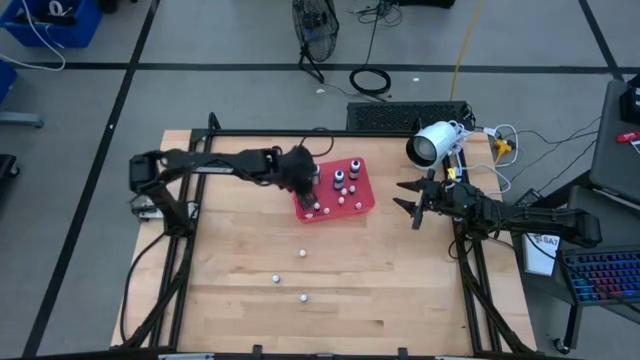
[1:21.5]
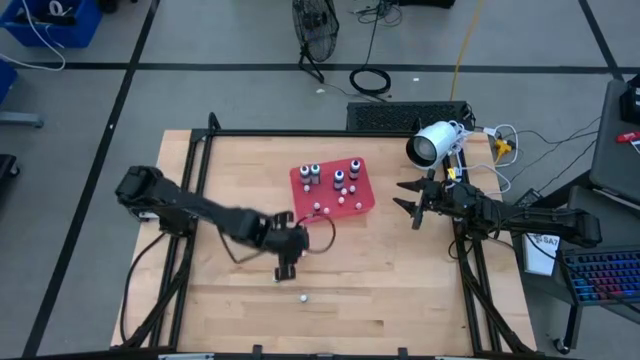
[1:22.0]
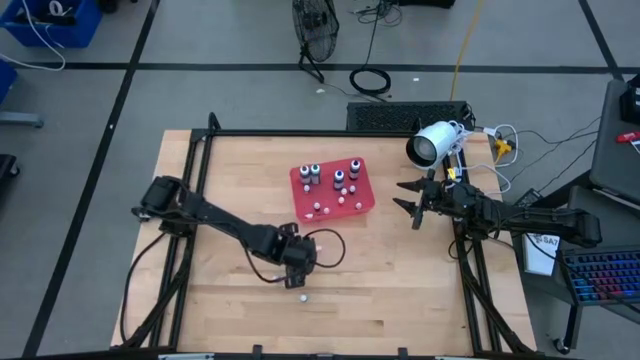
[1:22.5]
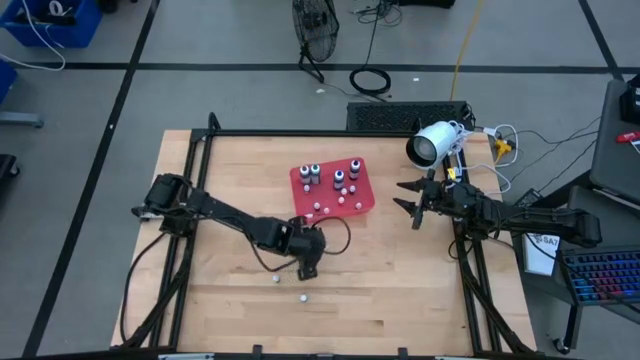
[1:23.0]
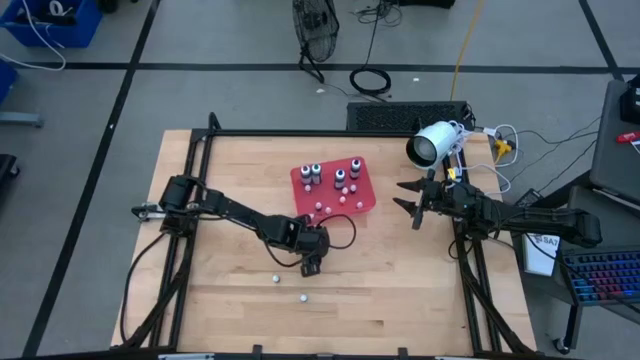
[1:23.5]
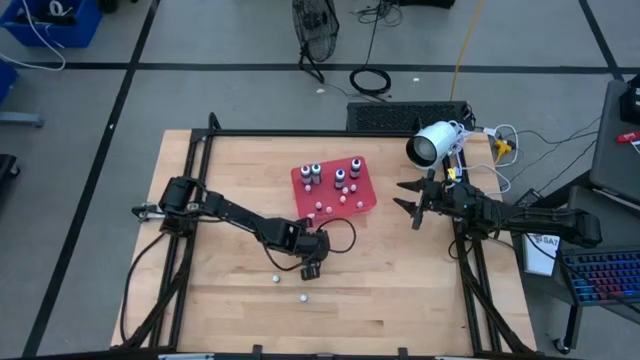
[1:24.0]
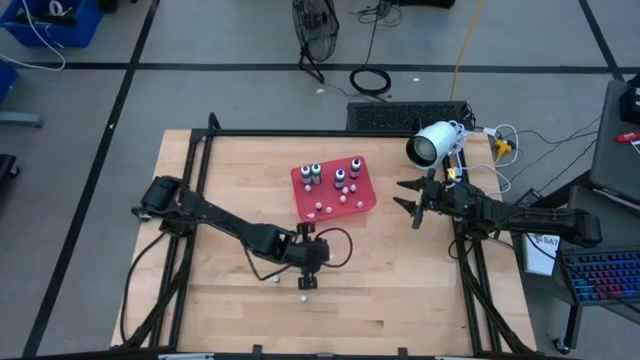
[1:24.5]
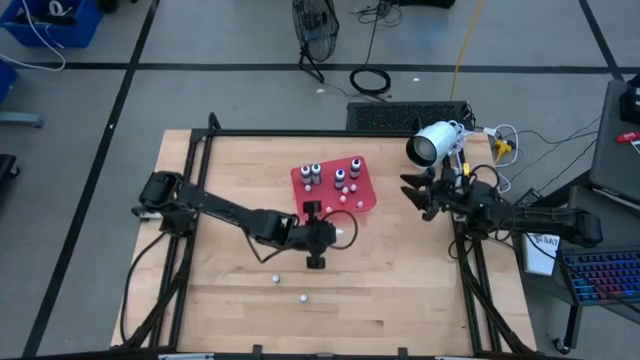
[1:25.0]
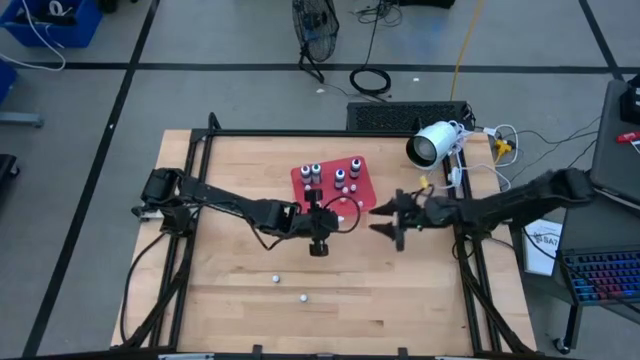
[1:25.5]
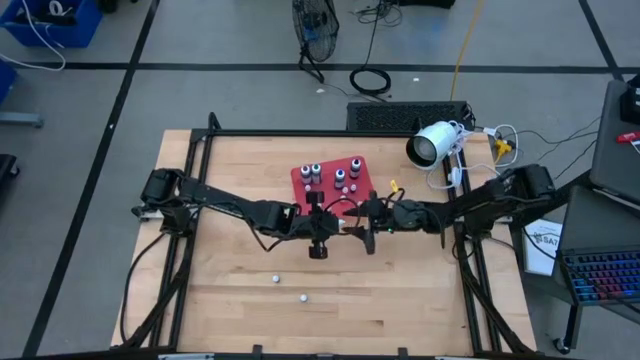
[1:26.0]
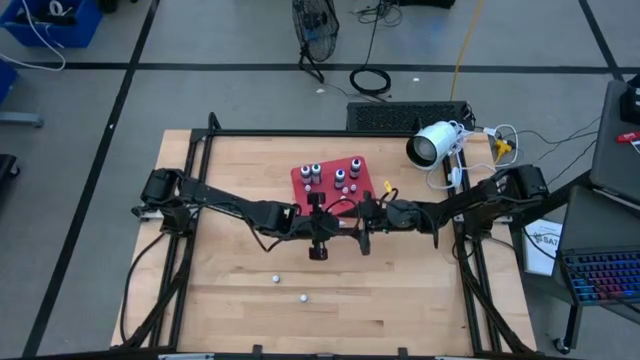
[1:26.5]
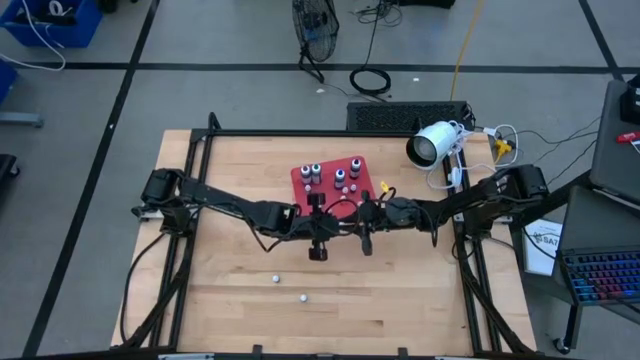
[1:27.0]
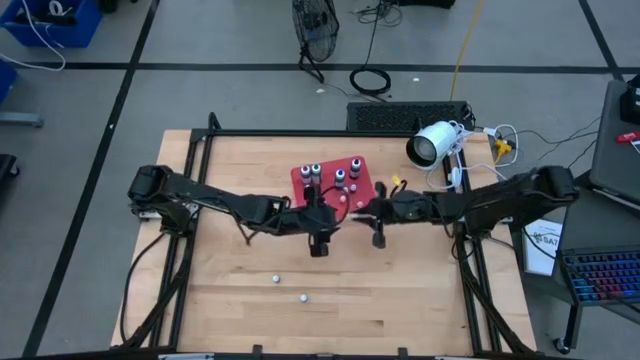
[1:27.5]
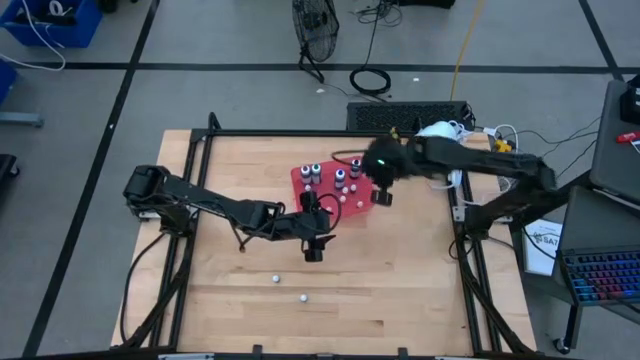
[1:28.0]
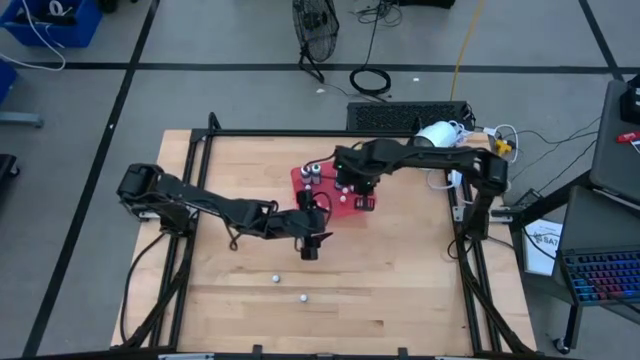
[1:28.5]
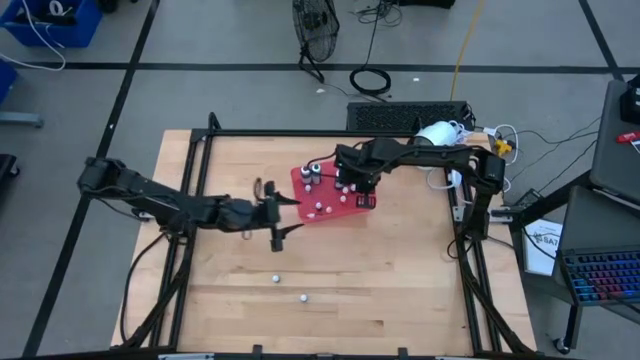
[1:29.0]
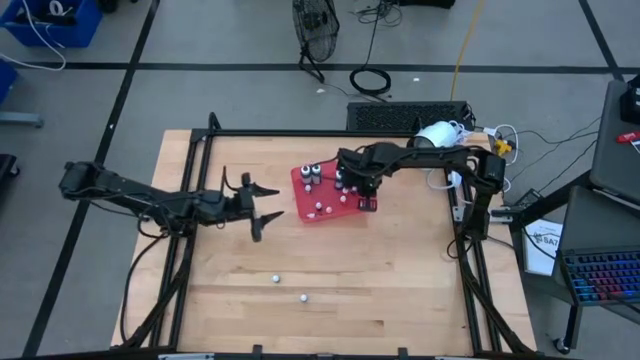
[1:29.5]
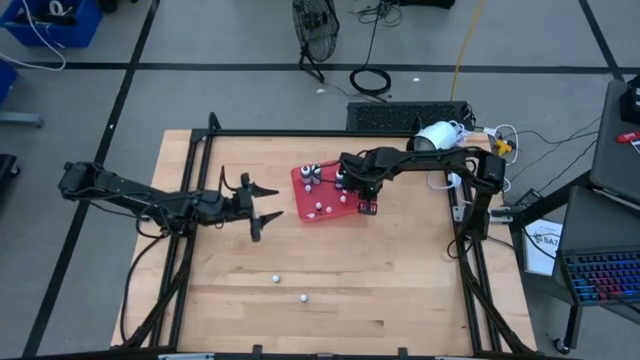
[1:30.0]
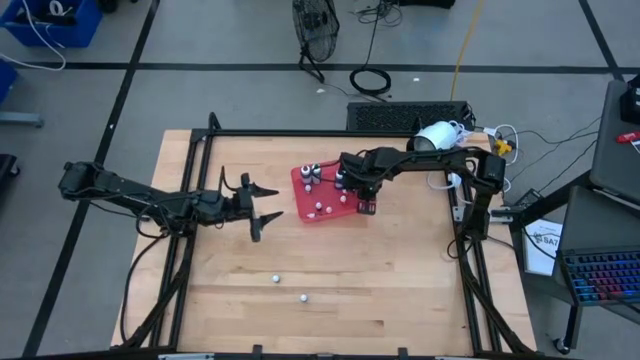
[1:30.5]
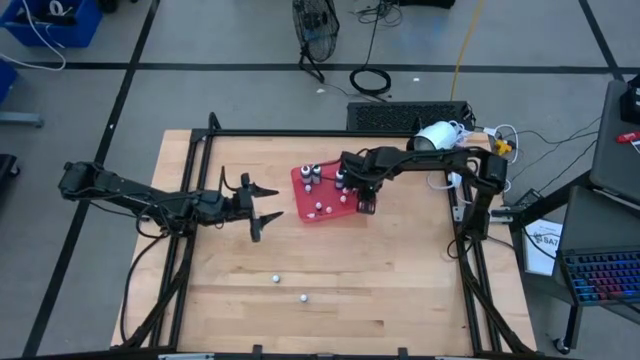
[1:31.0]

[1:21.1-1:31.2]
Task: Pick & Place food coloring
Put the orange food coloring bottle into the bin

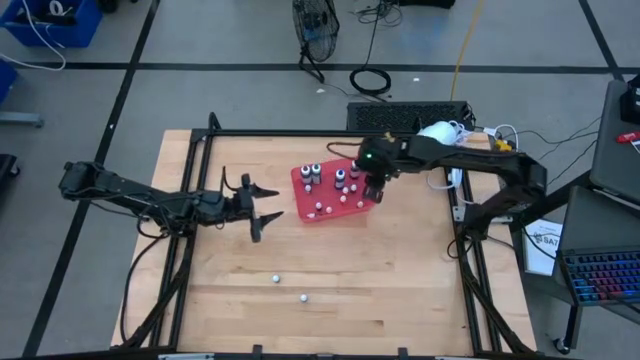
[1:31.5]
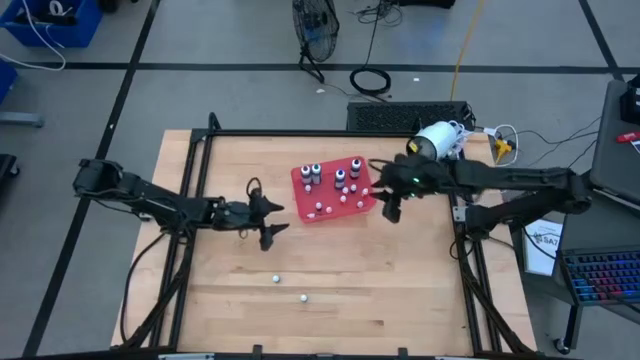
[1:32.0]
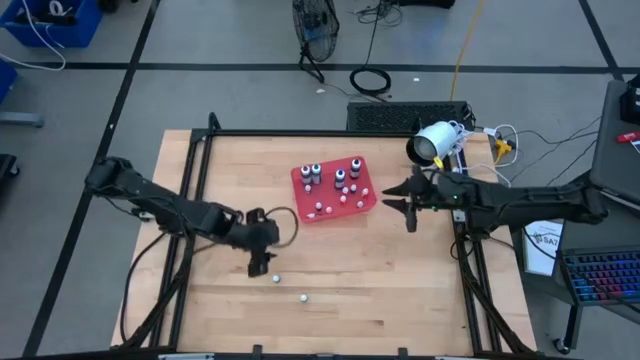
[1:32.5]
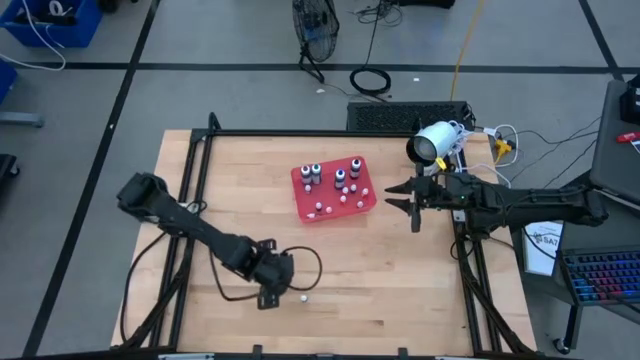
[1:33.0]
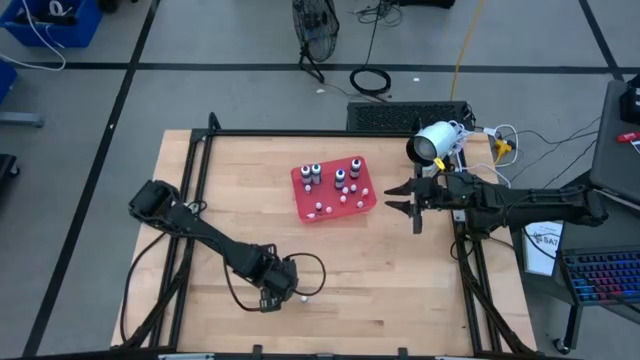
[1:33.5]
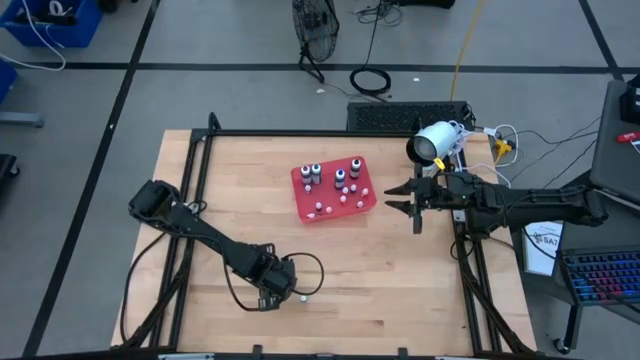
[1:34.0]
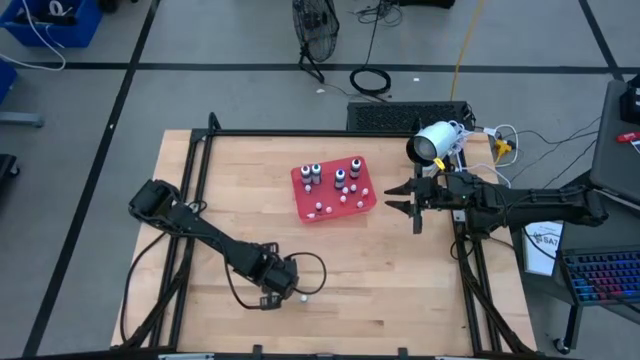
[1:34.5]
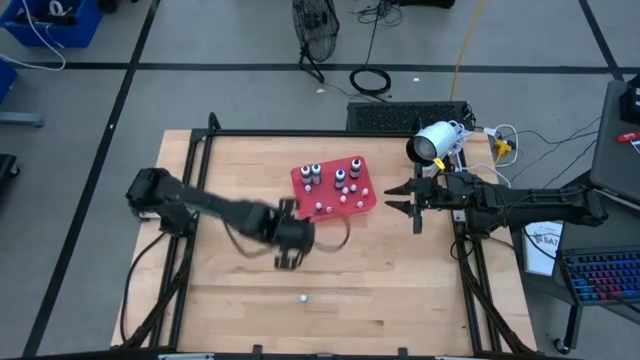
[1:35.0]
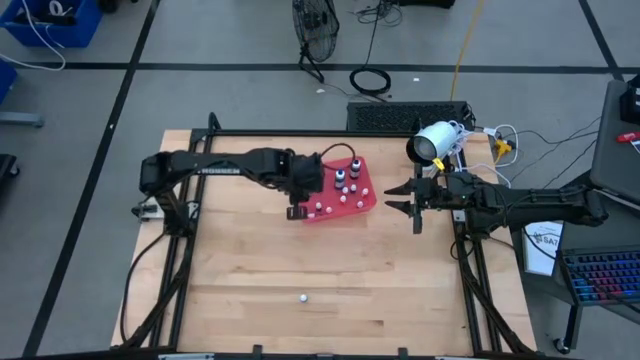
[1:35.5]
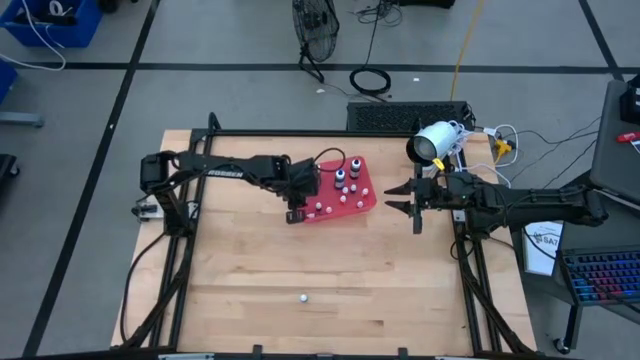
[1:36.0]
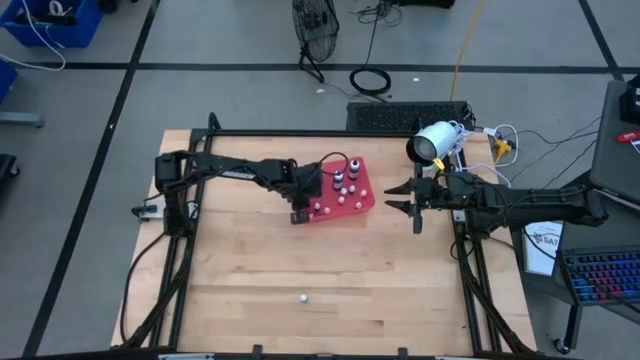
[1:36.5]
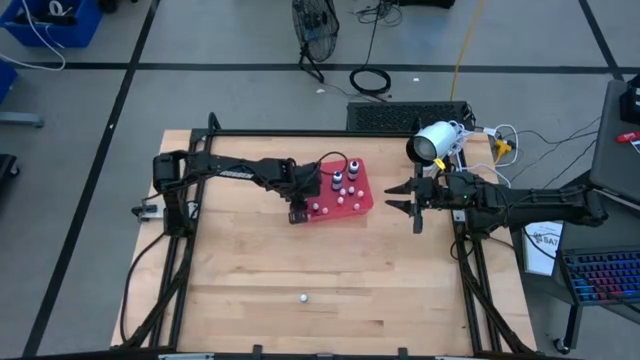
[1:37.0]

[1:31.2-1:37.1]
Put the small purple food coloring bottle into the bin

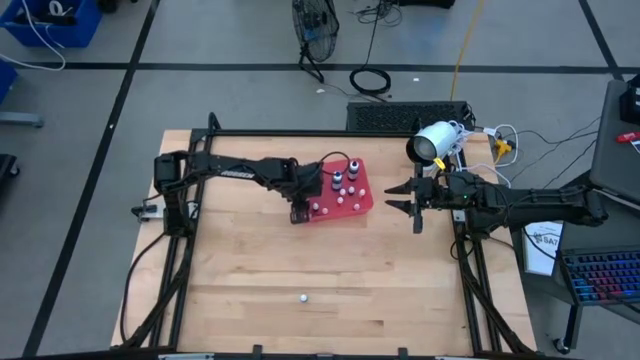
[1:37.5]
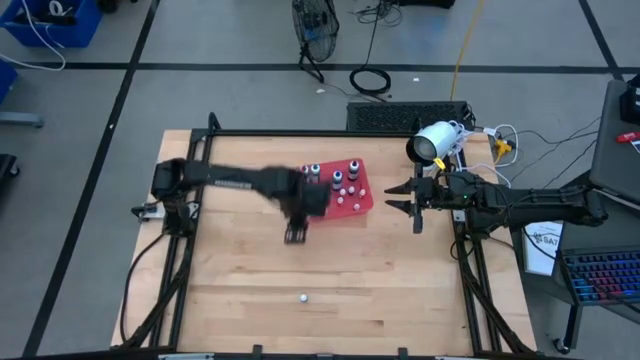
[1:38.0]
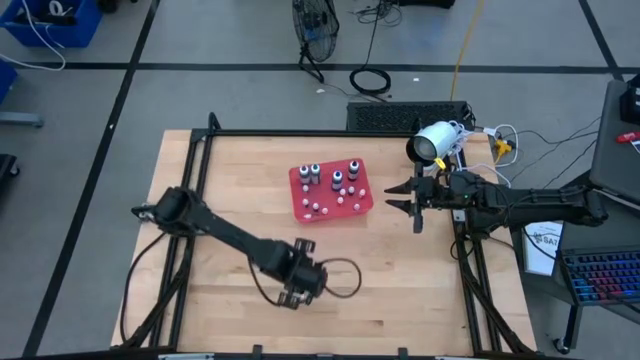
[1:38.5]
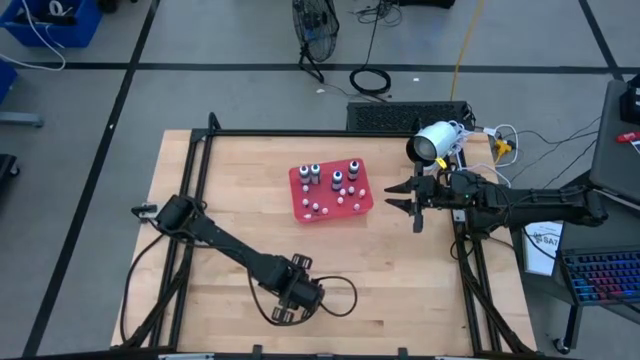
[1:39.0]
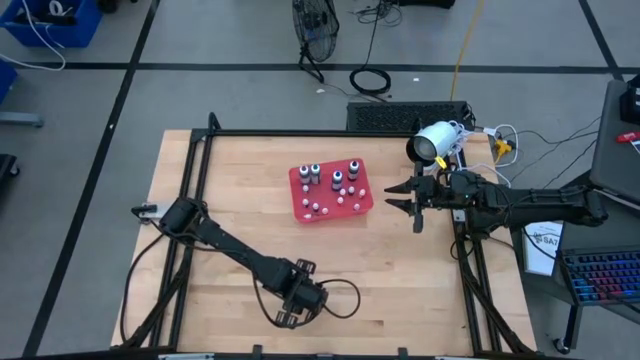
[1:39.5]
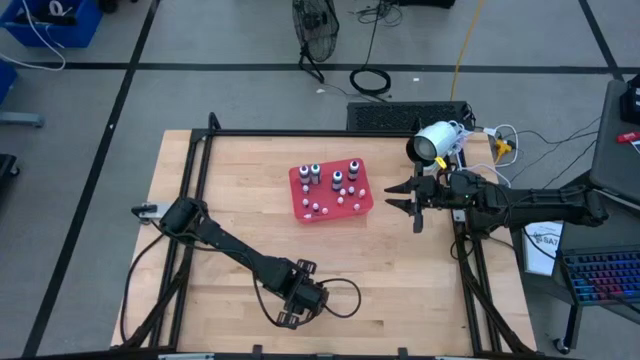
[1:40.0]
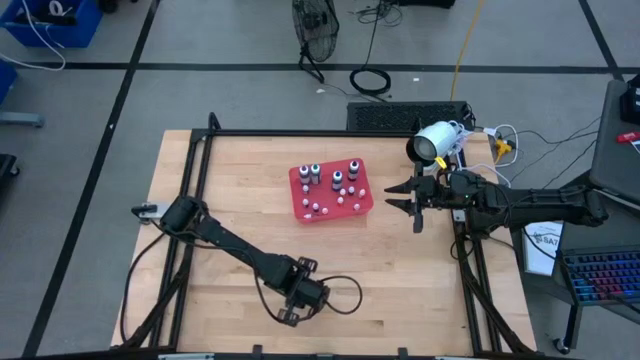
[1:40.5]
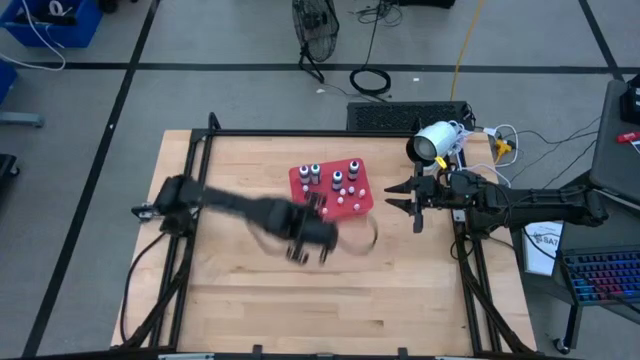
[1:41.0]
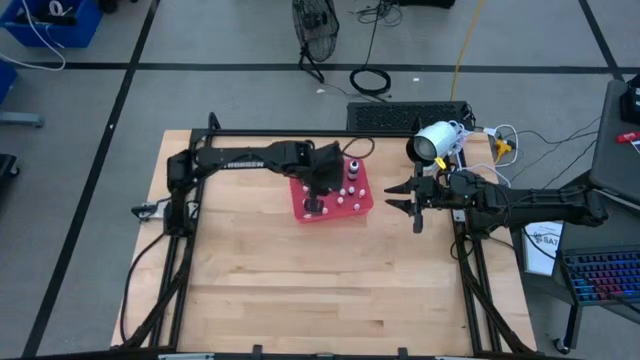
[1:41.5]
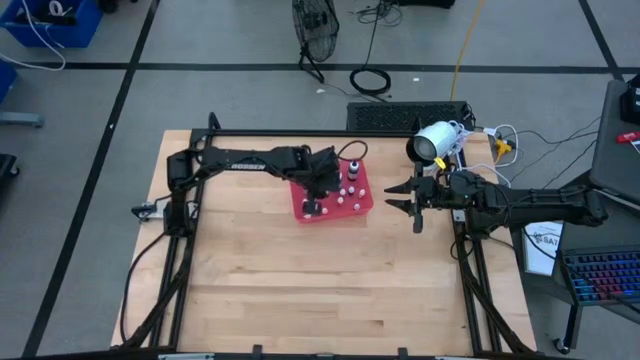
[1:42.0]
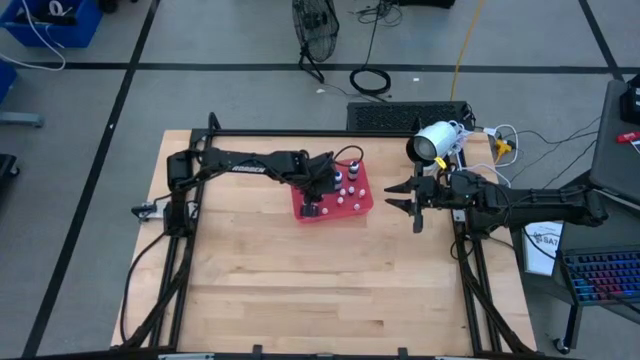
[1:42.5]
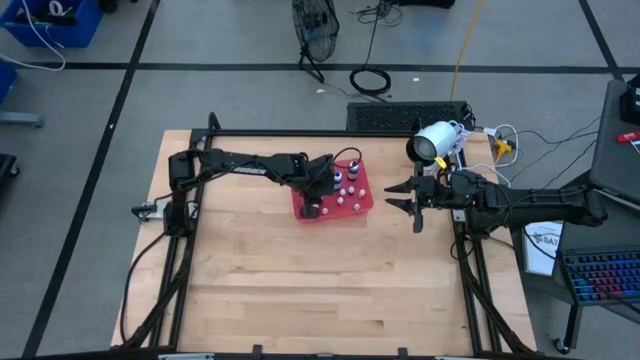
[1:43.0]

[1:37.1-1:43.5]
Put the small blue food coloring bottle into the bin
